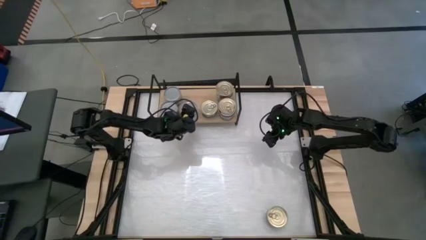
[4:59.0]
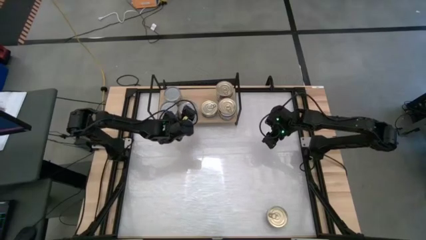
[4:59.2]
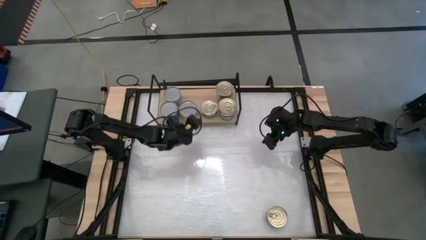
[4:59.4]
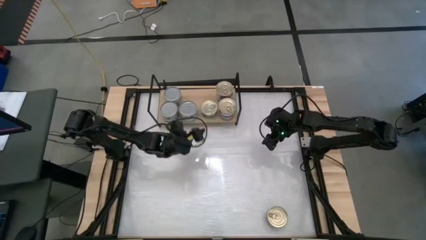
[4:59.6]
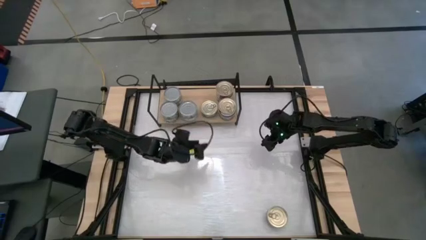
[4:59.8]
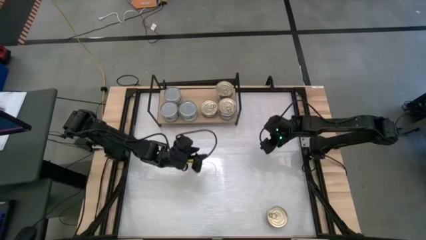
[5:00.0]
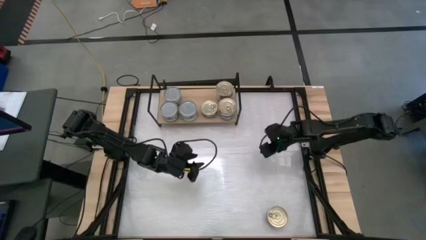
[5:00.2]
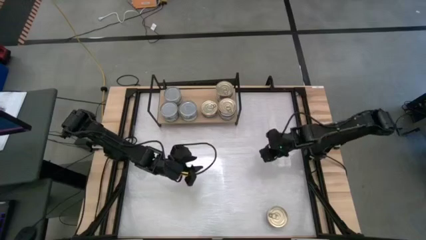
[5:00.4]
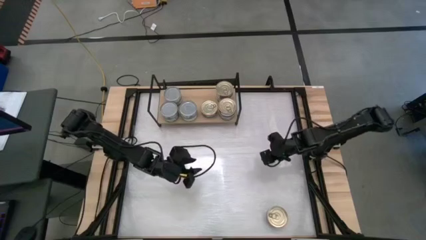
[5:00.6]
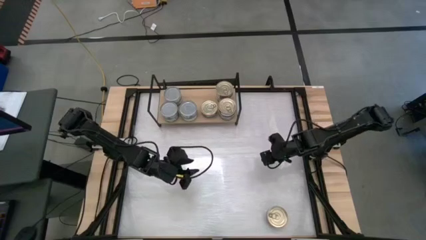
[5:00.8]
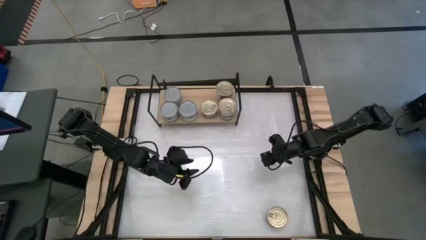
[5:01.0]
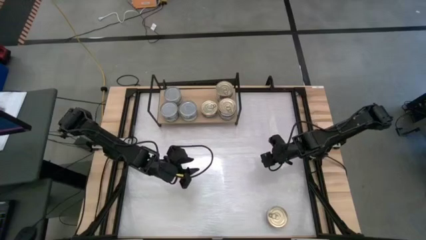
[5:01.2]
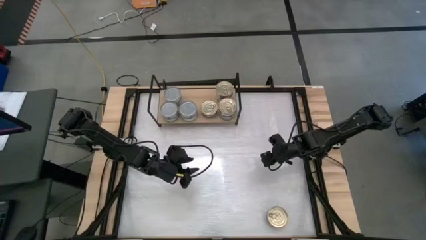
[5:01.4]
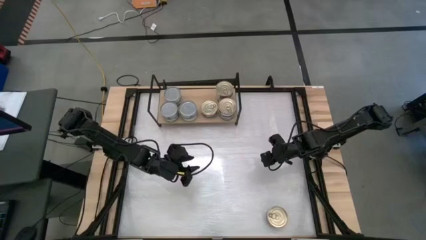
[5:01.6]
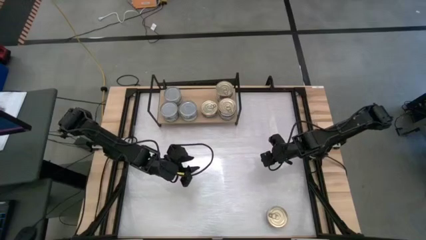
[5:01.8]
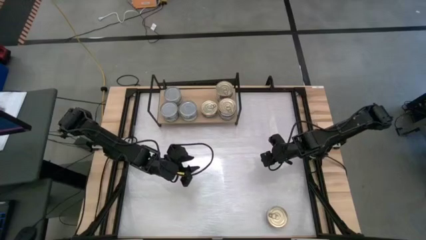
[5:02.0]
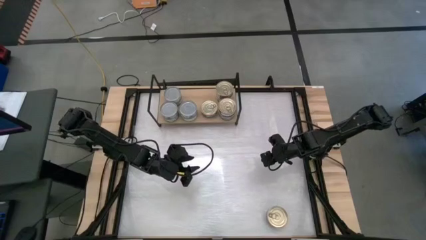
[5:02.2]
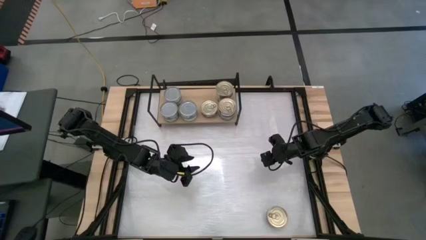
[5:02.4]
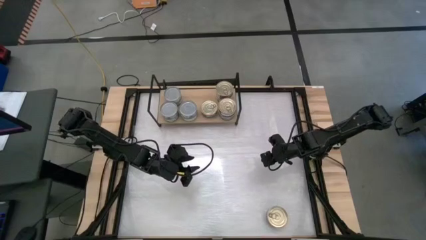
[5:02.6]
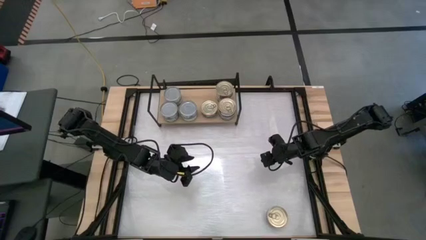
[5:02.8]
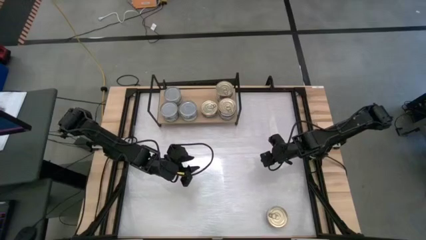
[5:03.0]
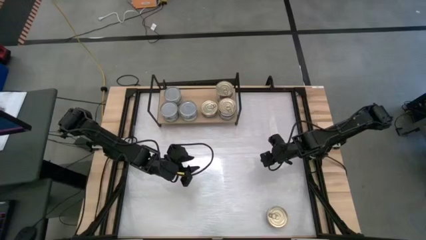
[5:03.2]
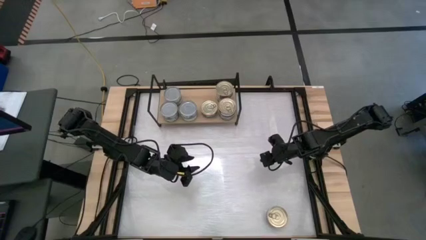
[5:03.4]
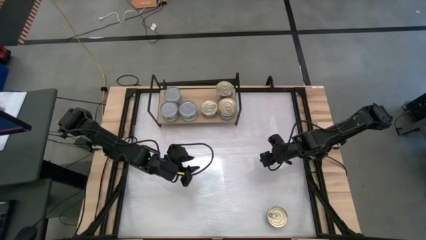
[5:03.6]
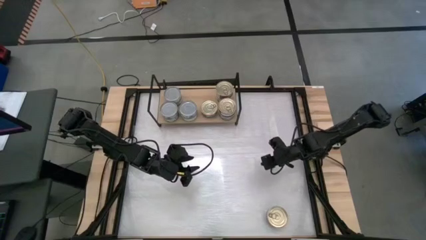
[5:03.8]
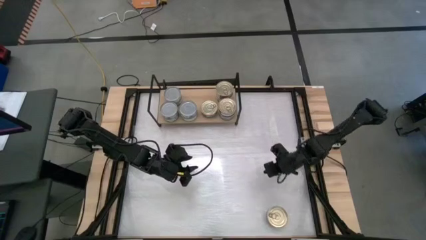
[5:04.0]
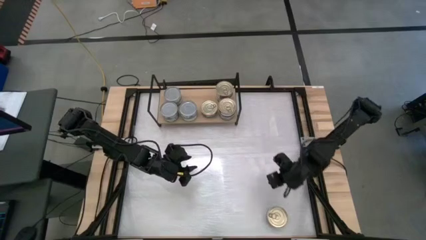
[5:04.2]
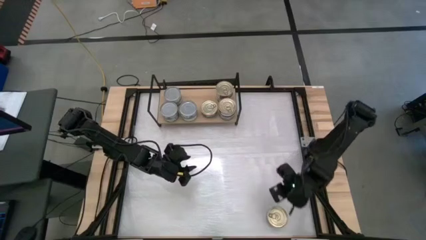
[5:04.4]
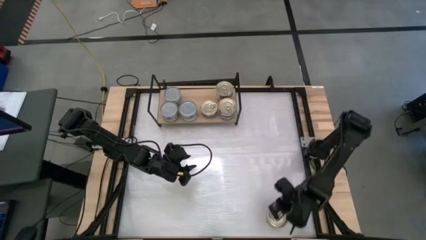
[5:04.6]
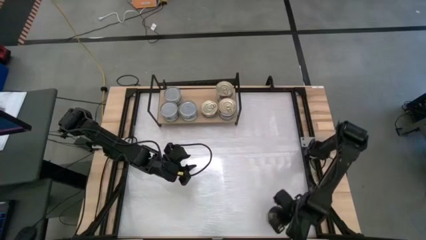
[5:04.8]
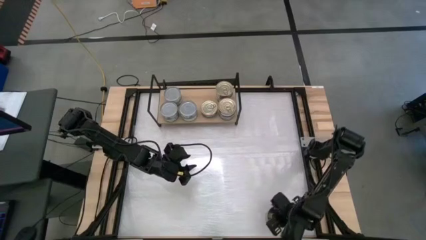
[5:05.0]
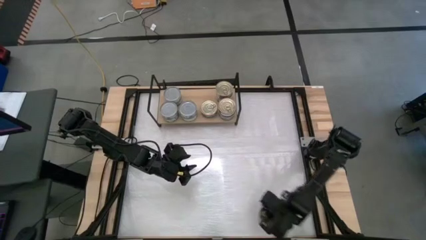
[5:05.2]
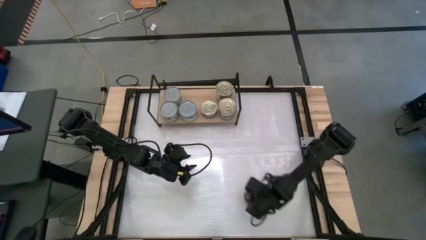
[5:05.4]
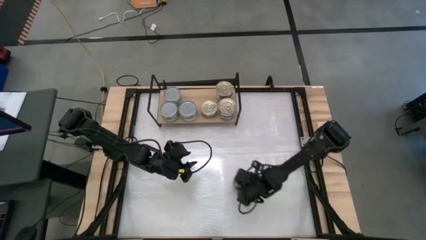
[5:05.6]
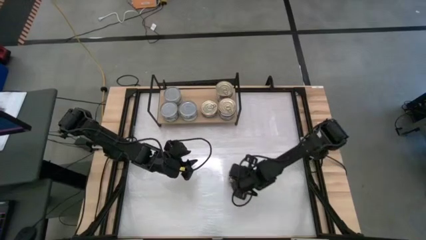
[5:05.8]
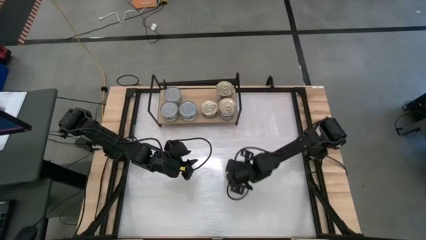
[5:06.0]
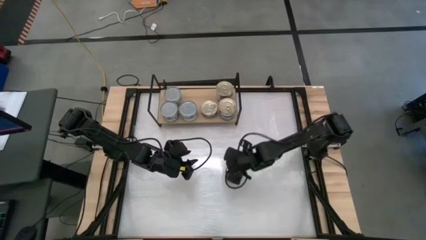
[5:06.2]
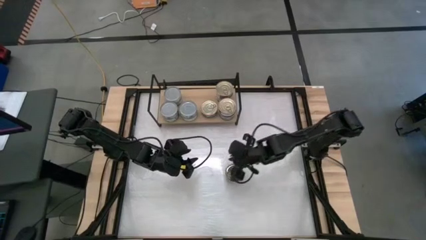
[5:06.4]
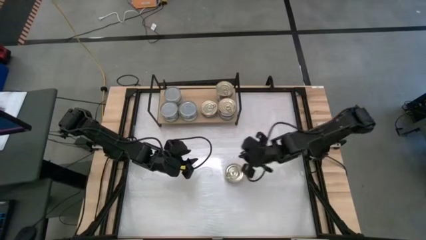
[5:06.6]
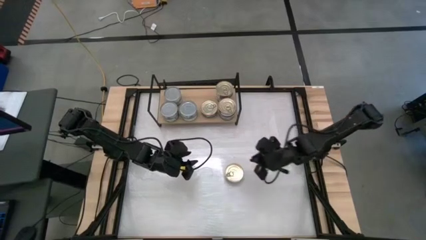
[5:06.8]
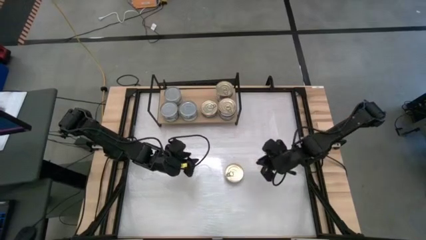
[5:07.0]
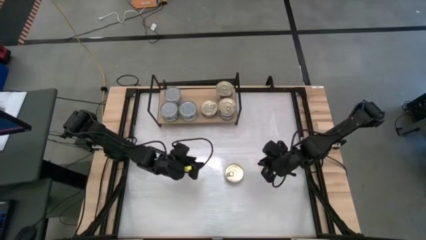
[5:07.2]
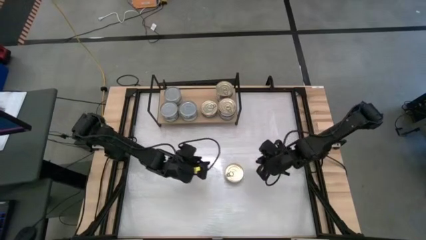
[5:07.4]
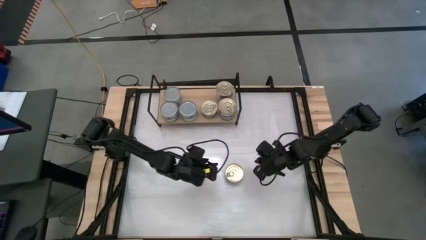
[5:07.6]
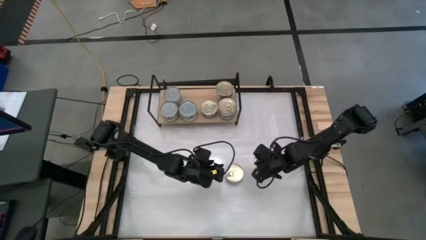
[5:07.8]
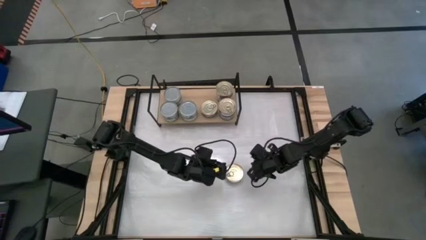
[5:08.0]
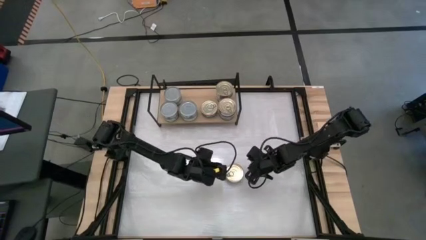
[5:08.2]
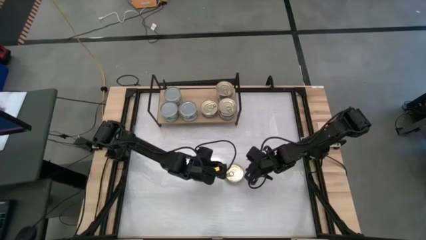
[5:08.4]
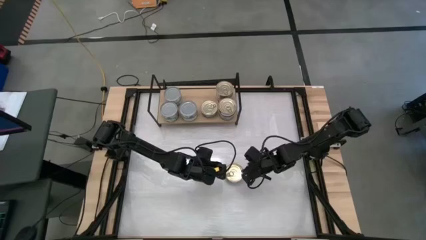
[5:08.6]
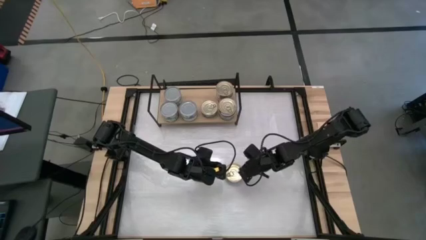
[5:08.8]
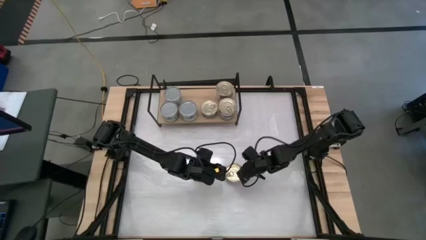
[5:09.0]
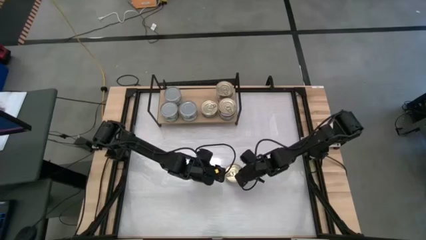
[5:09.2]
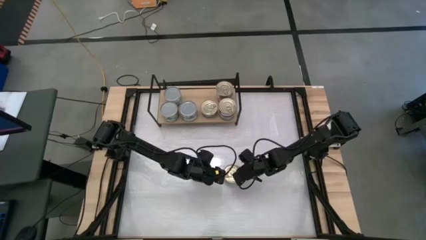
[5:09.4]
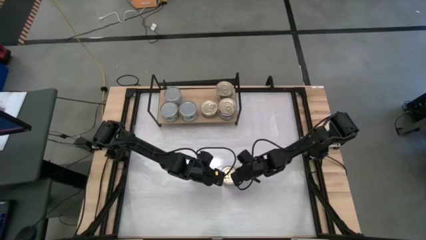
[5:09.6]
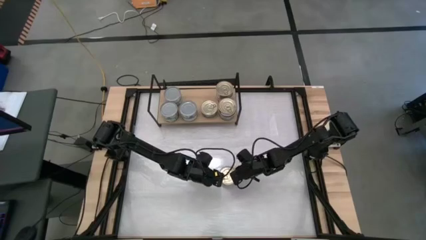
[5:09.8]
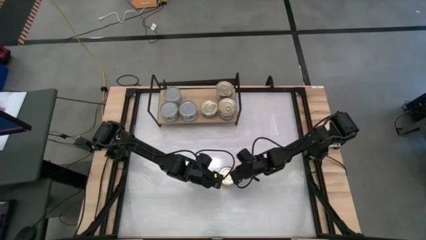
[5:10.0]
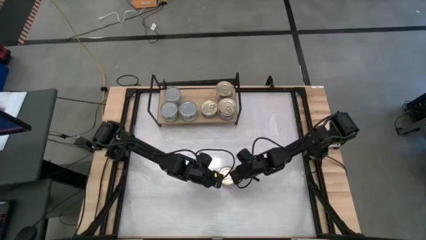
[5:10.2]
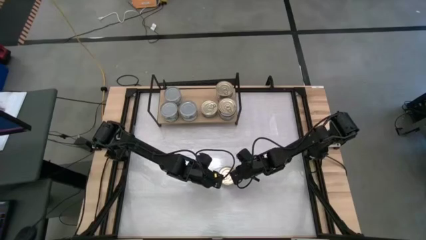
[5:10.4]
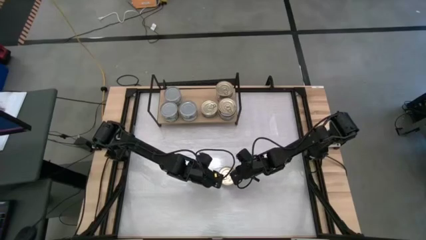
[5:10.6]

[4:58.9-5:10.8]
Task: Stack canned seafood by type on shelf
Stack the blue tuna can on top of the blue tuna can on the shelf

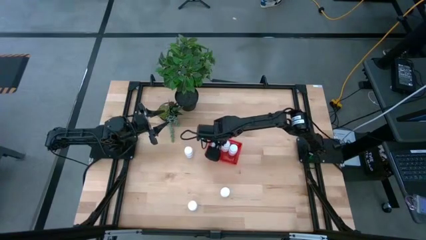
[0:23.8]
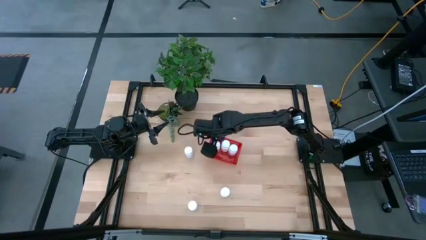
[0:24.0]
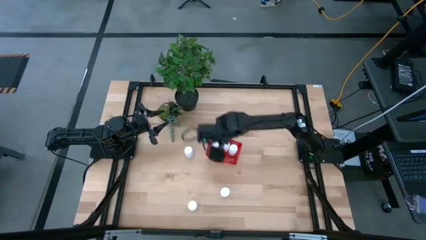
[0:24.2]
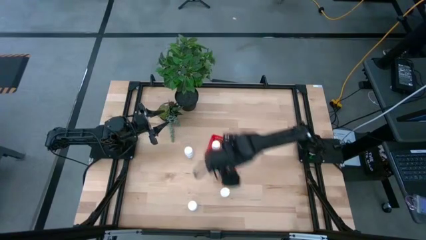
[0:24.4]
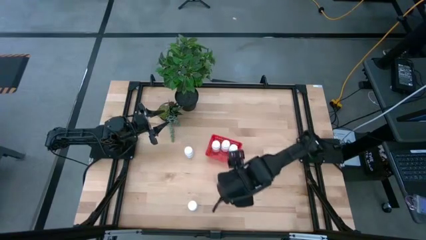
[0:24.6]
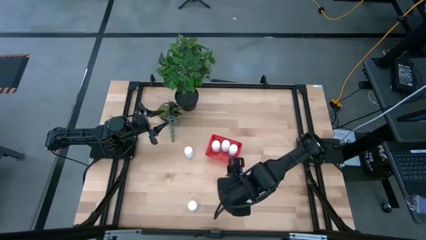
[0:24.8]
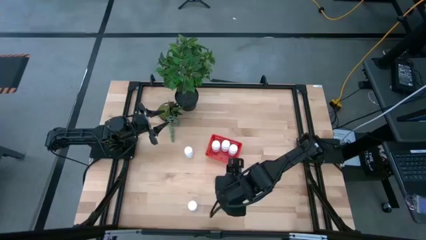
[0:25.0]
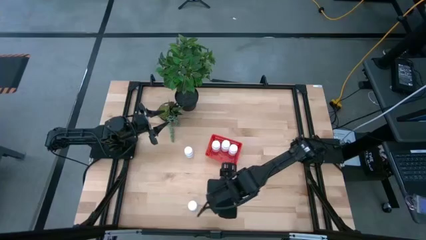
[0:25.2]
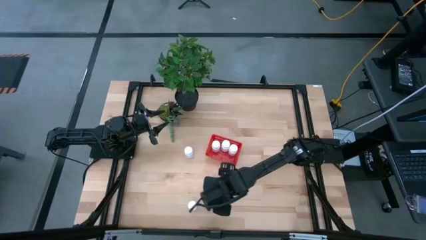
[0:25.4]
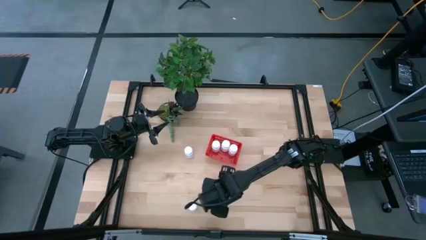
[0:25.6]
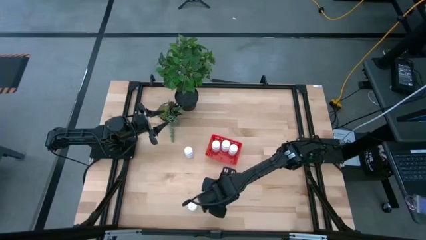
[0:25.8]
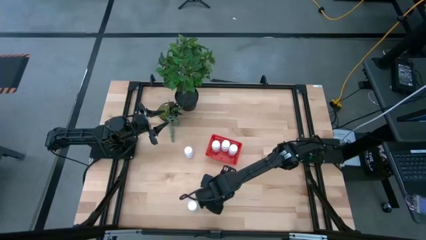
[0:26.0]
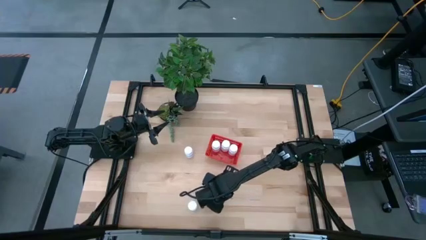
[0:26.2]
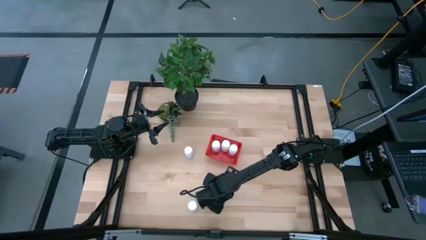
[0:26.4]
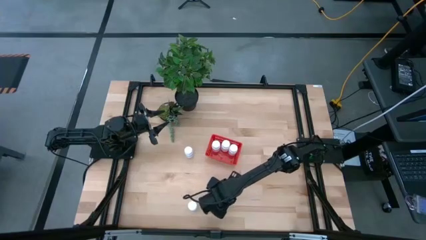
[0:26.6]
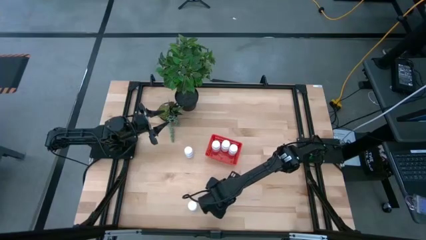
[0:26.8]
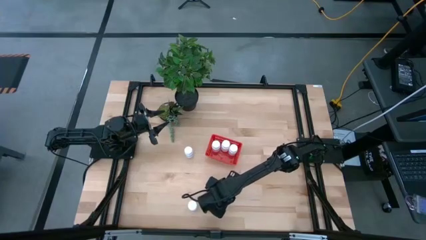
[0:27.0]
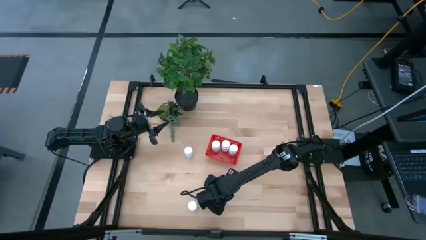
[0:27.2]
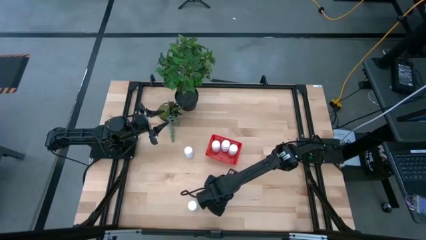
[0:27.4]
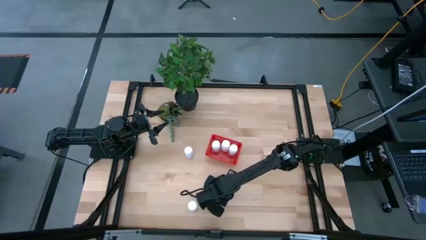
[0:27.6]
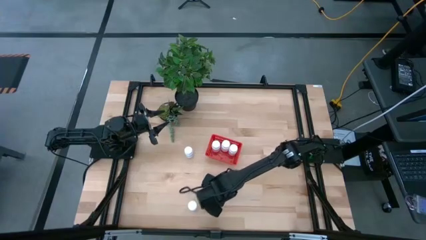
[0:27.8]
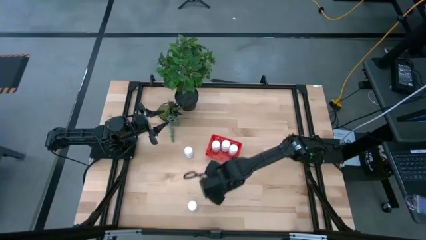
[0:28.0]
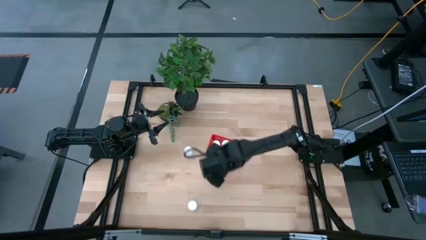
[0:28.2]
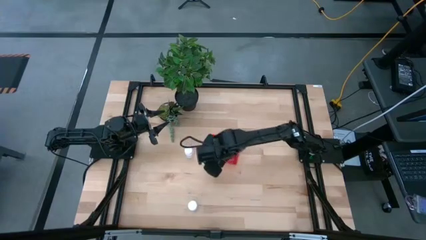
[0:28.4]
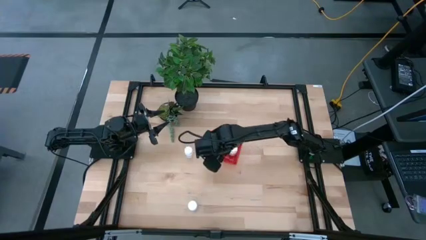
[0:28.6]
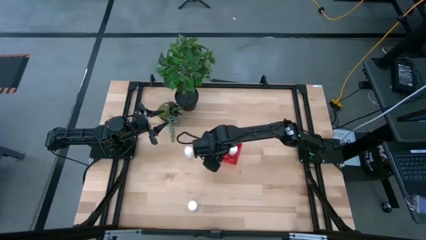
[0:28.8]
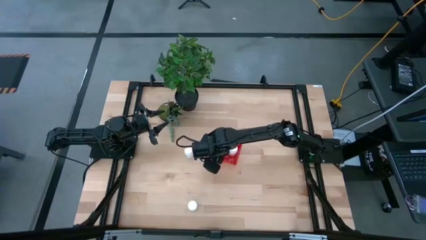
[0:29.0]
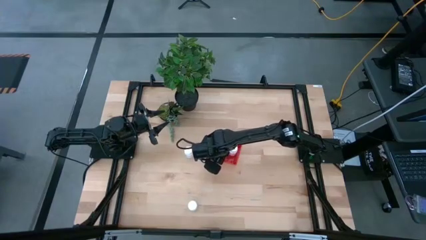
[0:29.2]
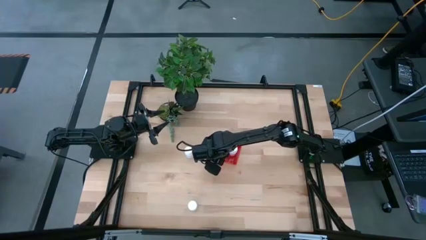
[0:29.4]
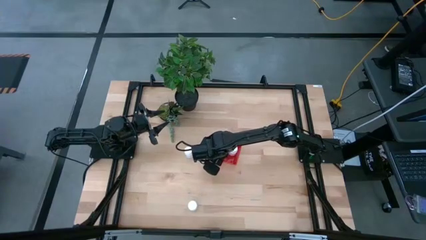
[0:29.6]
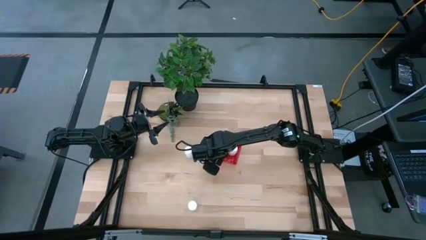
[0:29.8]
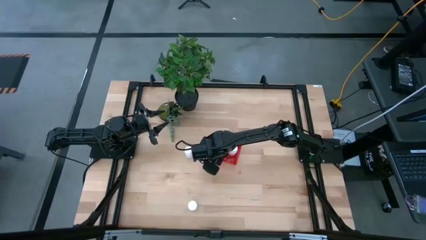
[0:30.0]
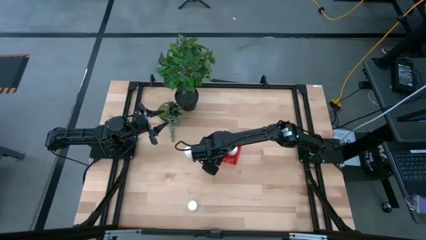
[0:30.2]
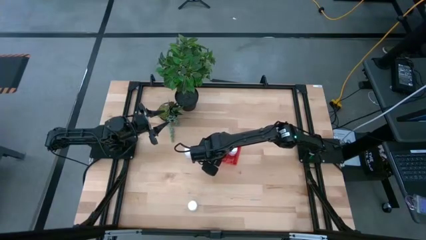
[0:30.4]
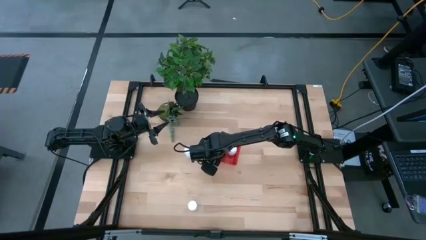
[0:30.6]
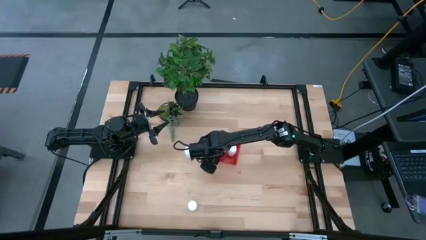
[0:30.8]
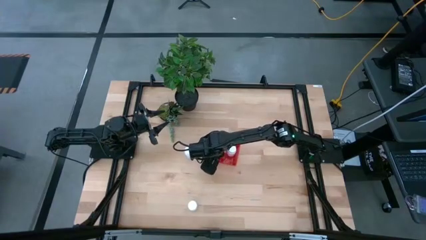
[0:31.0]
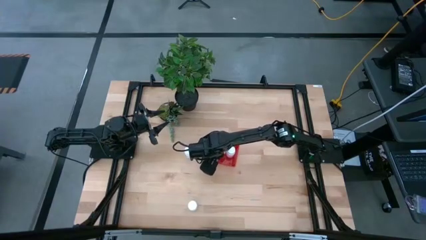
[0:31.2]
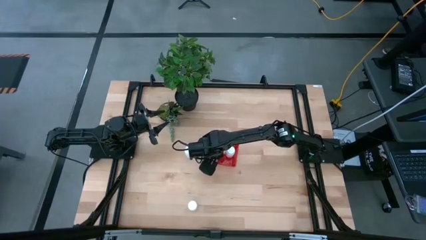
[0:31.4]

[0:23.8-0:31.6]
Task: Pick and place pill bottles into a basket
Put the white pill bottle into the red bin
